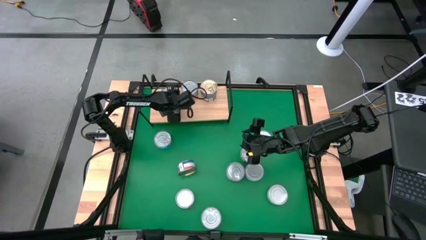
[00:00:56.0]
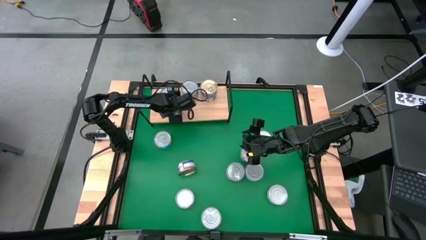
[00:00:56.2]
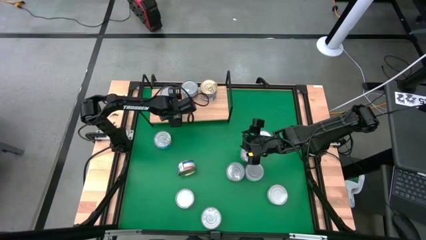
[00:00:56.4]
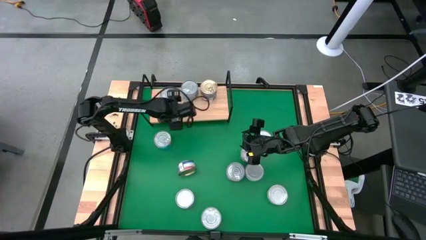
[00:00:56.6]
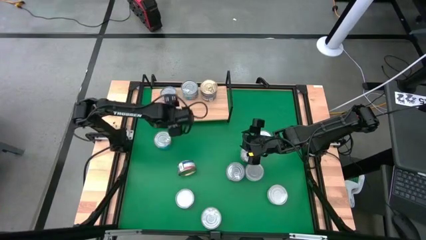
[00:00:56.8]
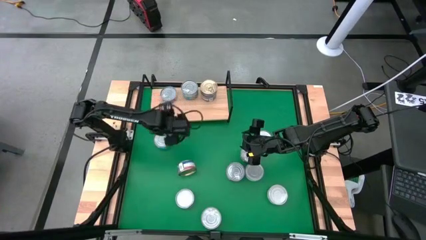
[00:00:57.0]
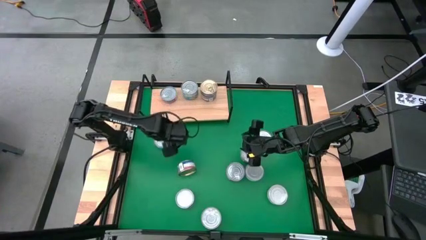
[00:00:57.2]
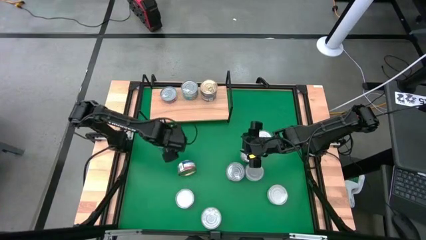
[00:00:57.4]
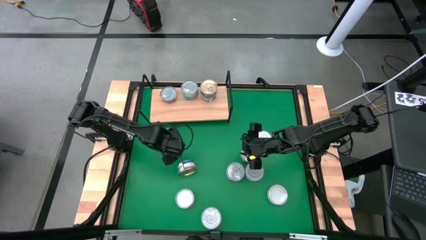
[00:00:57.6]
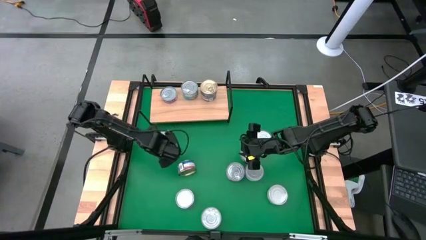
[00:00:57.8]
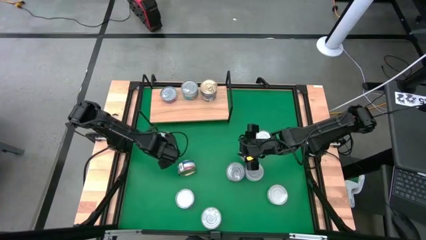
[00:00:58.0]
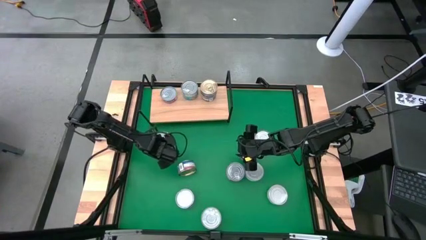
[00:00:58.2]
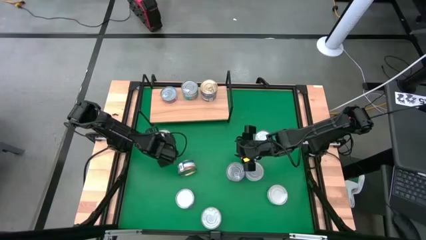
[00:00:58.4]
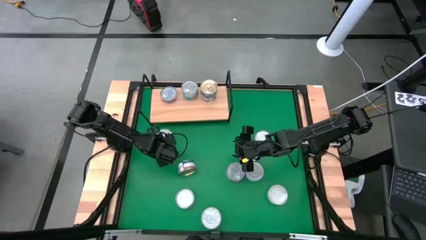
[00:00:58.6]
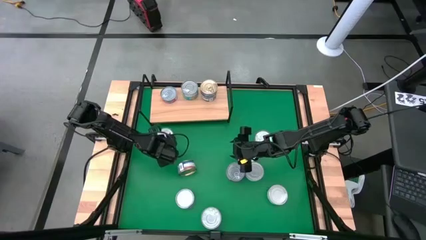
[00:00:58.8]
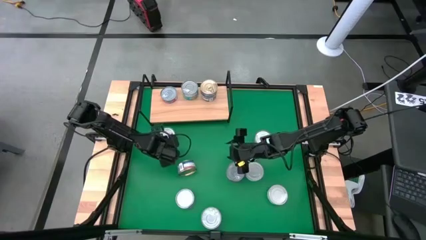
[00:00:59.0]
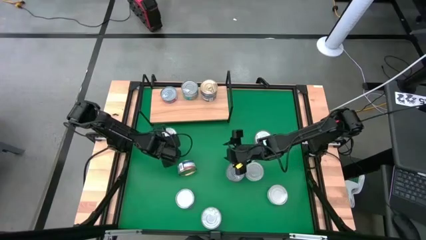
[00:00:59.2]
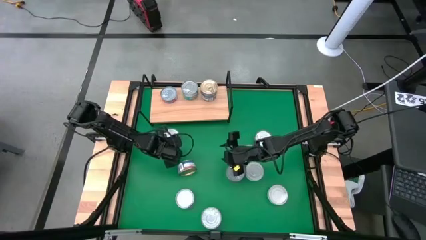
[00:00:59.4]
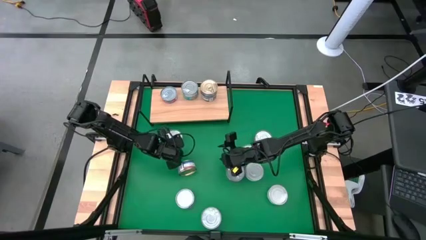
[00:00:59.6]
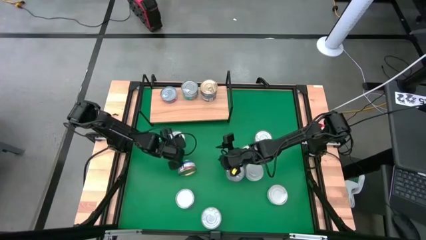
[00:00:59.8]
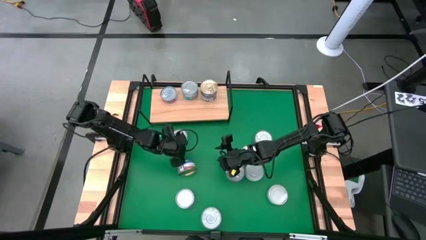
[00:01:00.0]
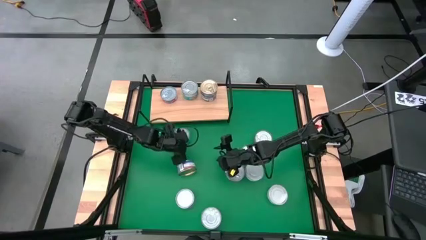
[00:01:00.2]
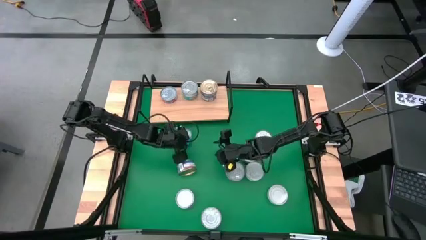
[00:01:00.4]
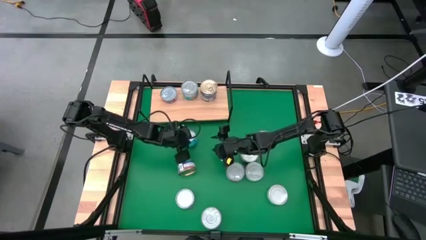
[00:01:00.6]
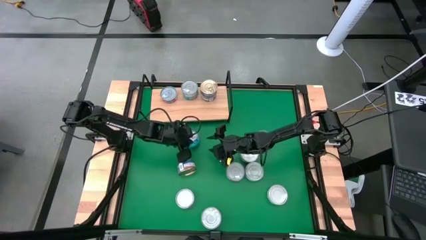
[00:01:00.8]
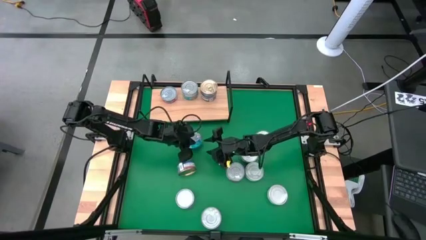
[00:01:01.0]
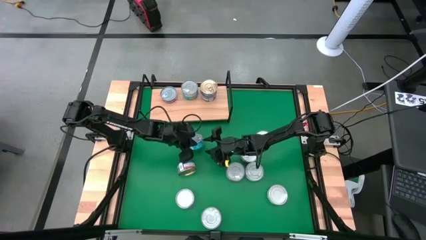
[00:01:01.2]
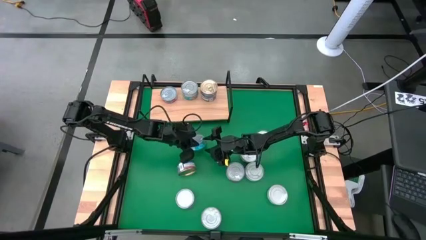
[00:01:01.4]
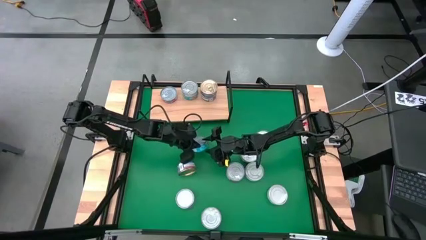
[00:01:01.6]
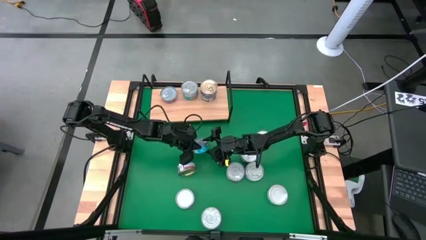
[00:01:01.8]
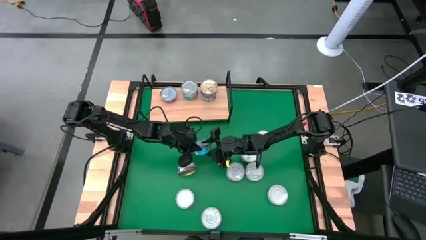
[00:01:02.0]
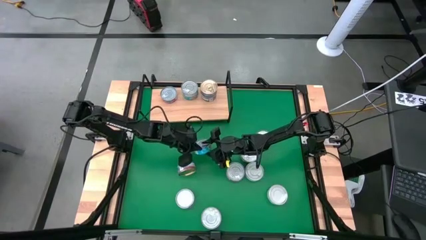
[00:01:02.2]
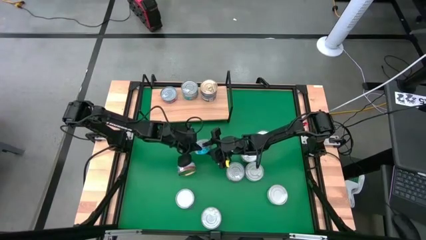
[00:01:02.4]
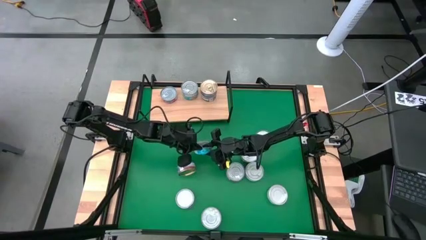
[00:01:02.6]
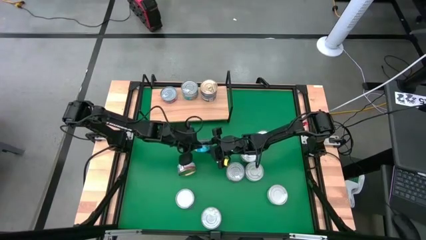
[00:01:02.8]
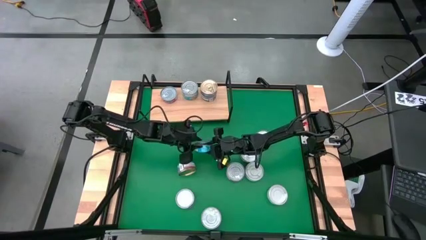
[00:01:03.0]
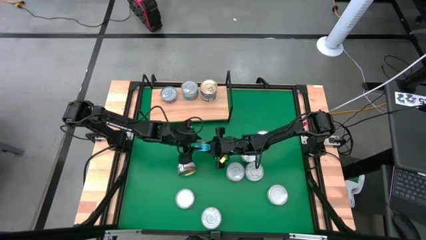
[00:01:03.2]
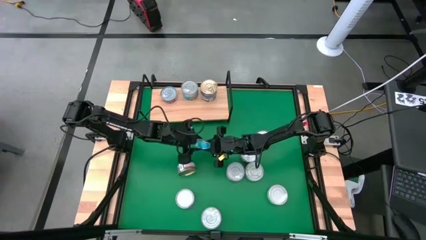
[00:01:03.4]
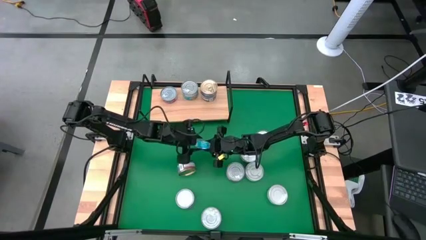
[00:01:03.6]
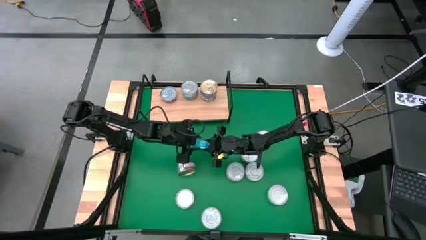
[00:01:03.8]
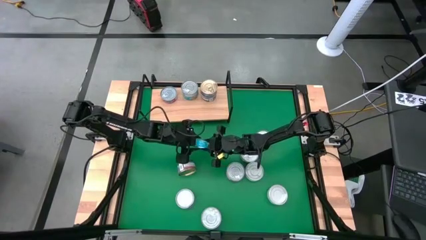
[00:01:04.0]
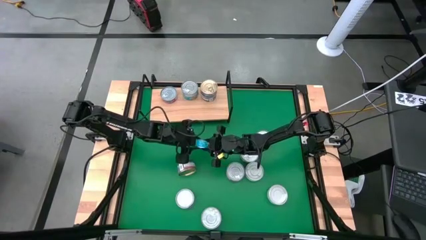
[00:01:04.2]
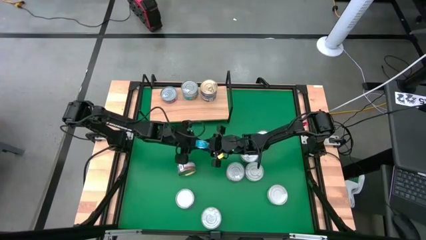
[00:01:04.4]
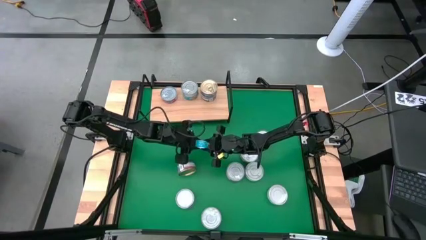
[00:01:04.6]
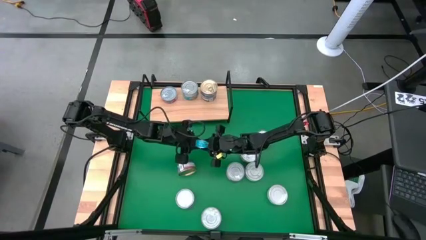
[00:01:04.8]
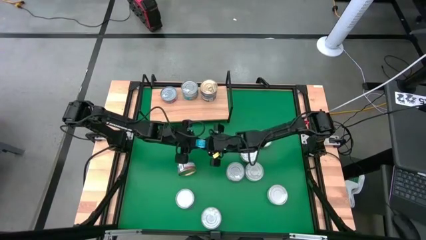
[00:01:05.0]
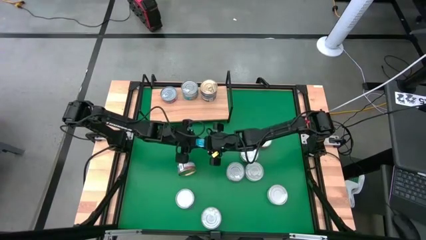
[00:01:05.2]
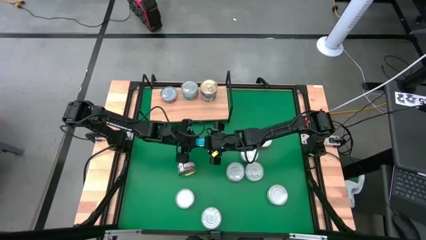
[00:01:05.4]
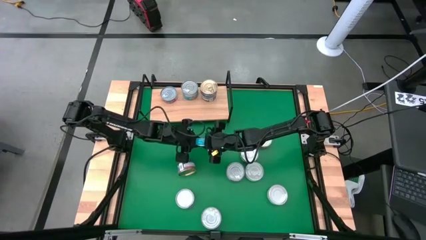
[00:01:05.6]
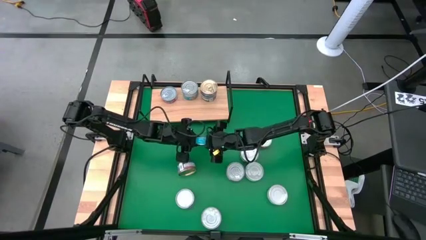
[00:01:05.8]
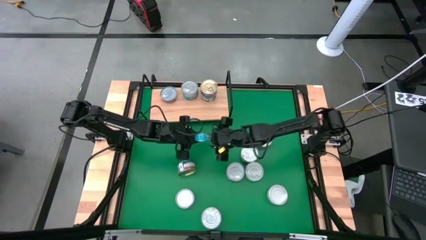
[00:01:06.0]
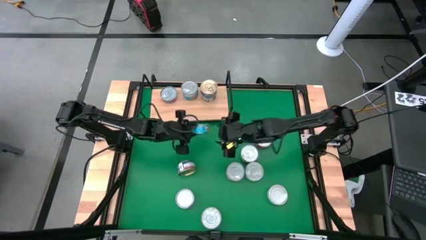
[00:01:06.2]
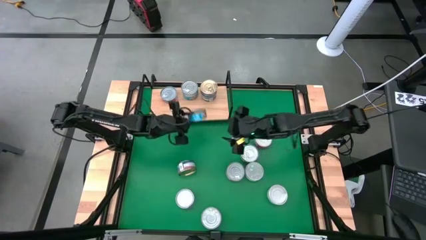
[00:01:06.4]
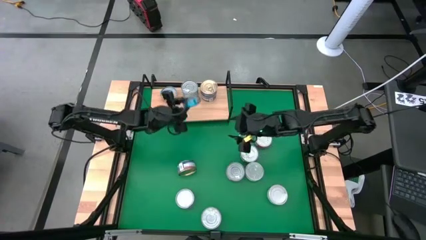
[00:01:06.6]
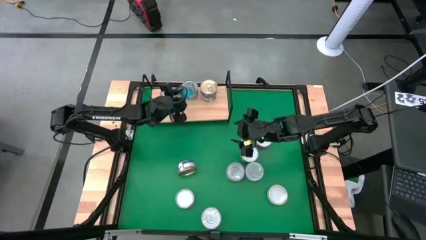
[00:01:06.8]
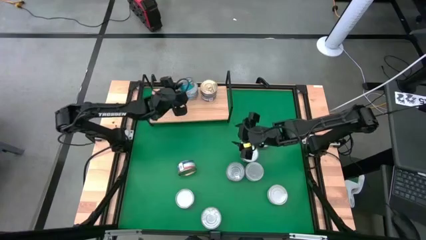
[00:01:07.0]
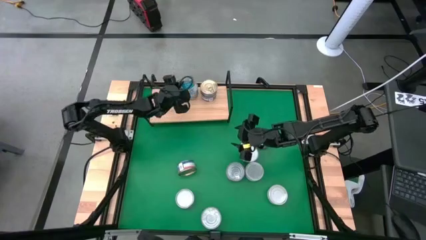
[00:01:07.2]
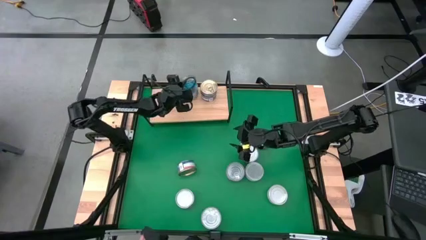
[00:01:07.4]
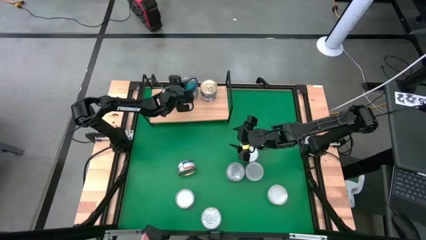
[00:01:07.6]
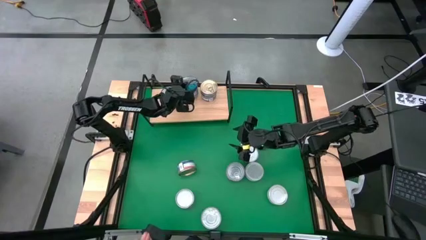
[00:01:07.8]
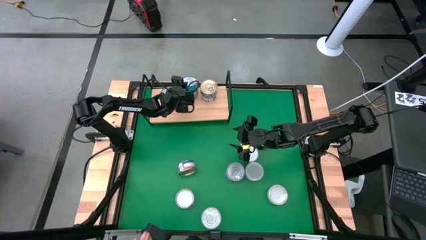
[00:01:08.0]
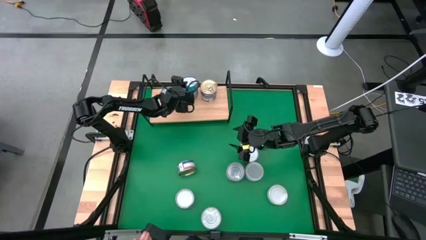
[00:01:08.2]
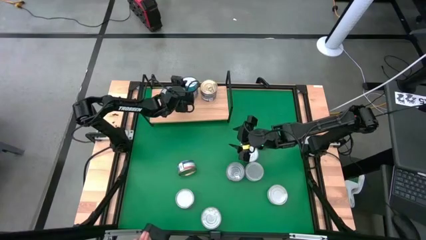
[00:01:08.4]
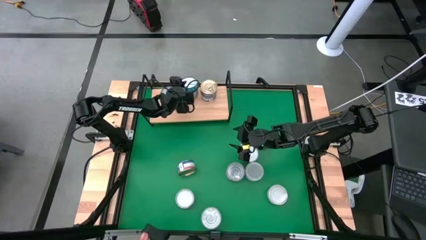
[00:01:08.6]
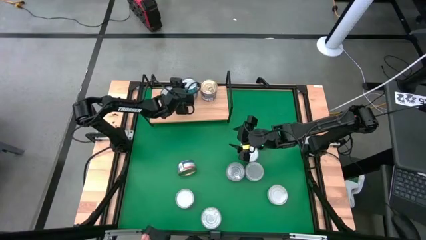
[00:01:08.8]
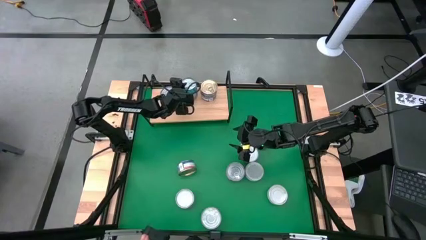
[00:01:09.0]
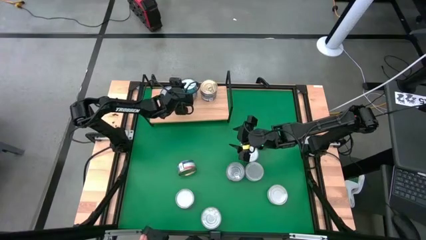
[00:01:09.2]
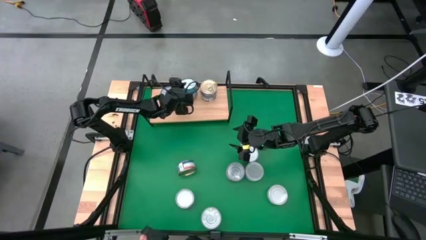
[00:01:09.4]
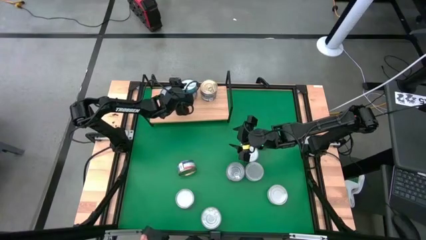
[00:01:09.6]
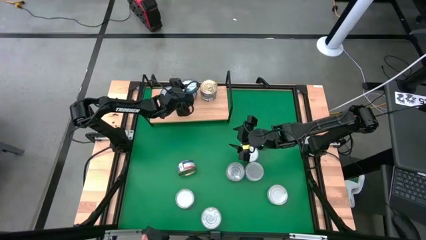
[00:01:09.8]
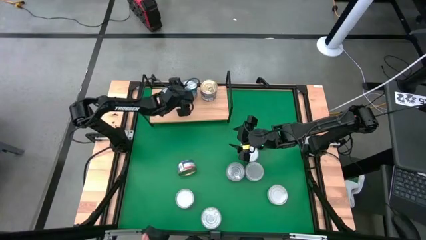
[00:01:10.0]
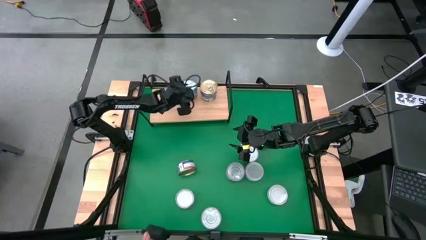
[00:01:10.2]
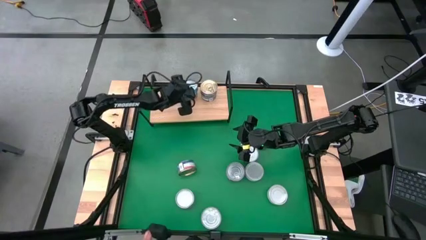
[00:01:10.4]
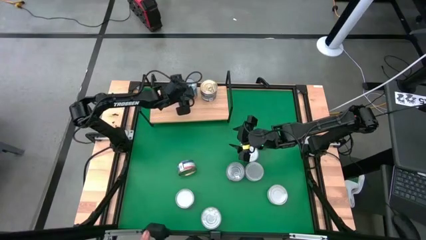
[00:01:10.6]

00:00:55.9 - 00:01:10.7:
Task: Stack canned seafood by type on shelf
Stack the yellow blue tuna can on top of the other yellow blue tuna cans on the shelf

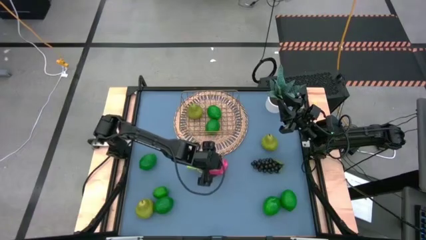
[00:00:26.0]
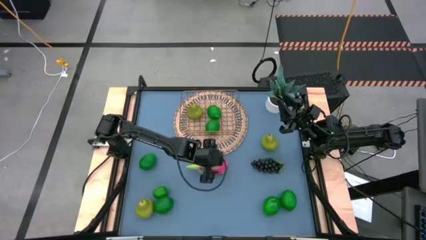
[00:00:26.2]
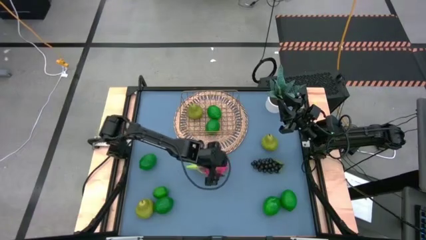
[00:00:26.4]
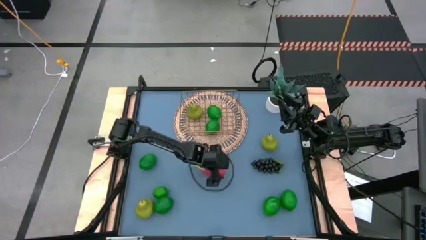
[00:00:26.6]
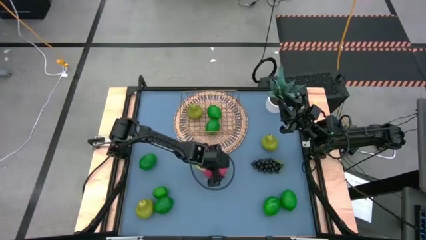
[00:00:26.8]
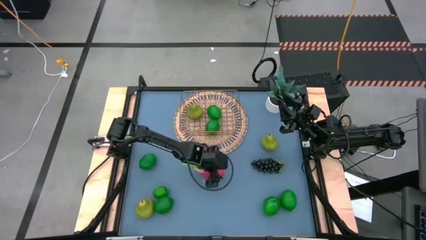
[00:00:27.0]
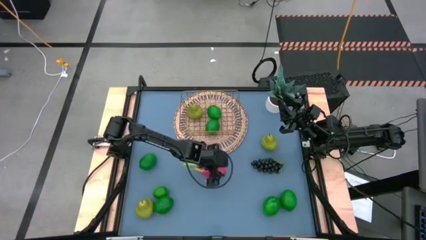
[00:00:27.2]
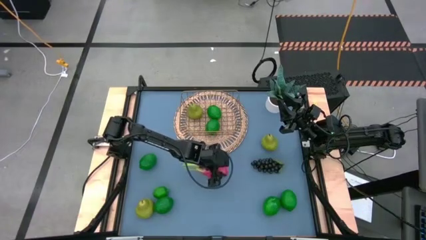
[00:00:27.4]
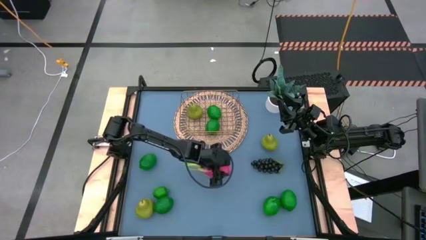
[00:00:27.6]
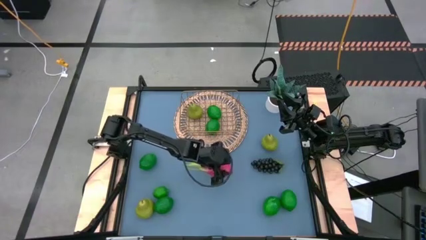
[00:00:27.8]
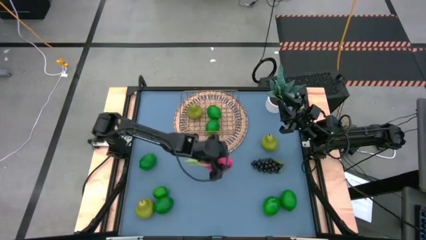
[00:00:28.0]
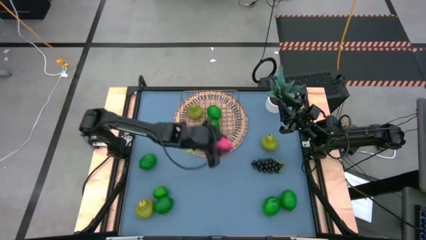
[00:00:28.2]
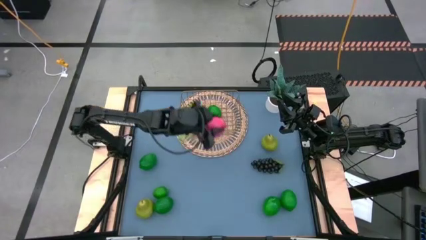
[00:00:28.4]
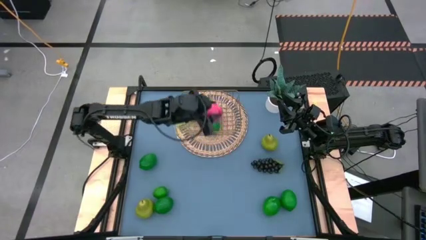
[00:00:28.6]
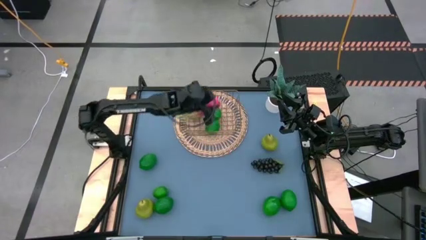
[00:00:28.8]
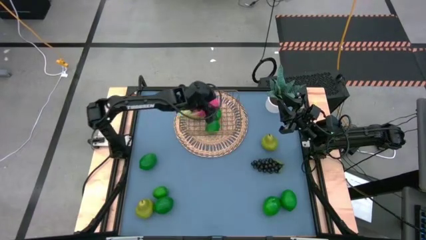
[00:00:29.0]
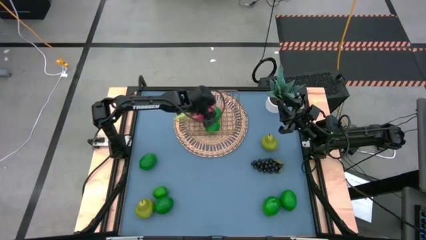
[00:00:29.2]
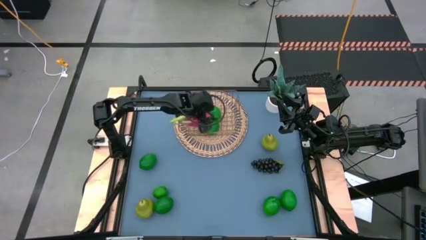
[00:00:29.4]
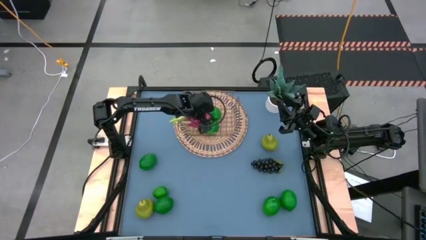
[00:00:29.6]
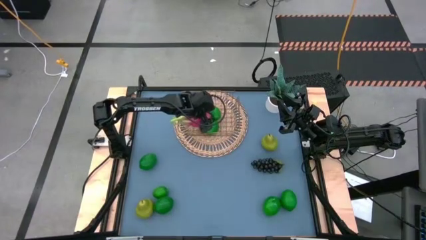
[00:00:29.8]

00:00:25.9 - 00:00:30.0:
Task: Build produce basket
Put the red dragon fruit into the gold wire basket
